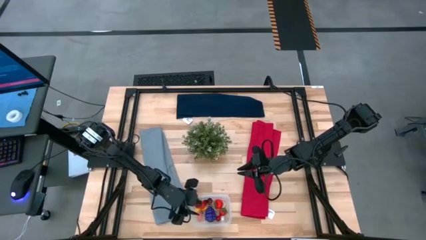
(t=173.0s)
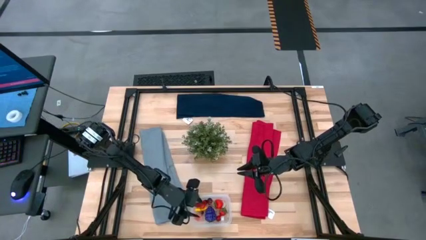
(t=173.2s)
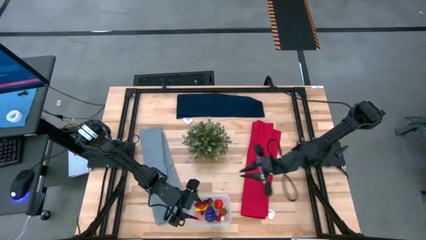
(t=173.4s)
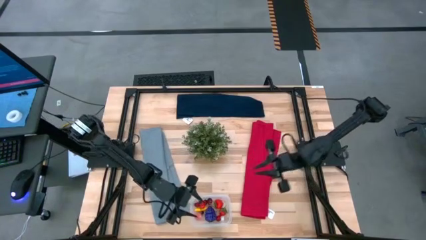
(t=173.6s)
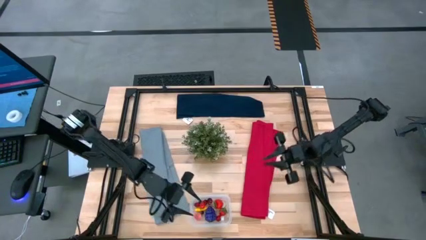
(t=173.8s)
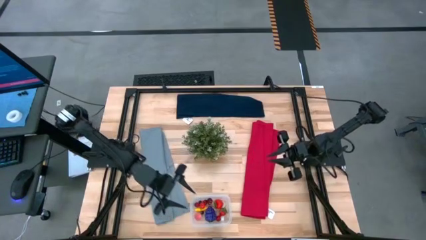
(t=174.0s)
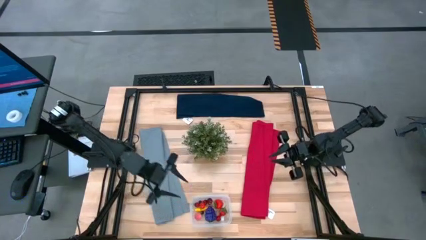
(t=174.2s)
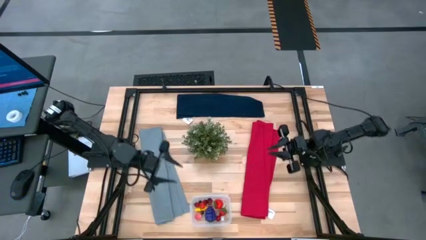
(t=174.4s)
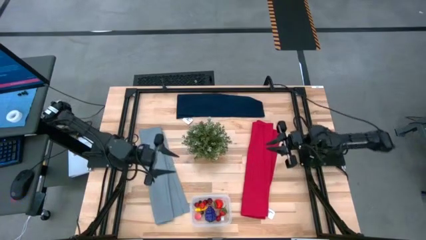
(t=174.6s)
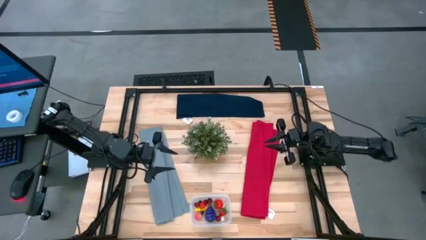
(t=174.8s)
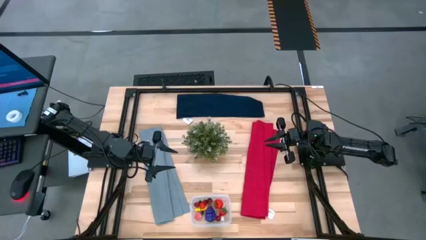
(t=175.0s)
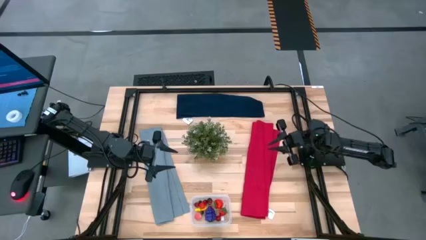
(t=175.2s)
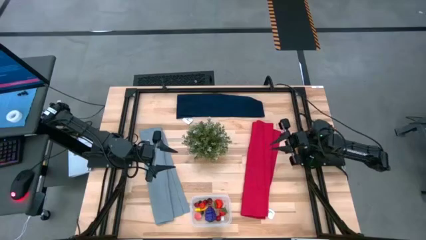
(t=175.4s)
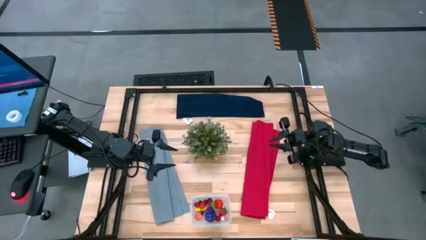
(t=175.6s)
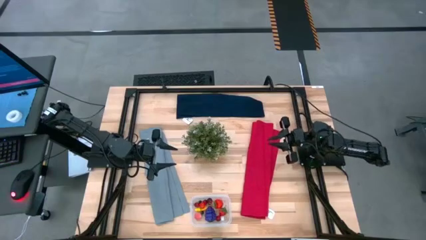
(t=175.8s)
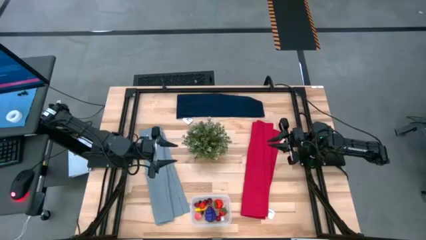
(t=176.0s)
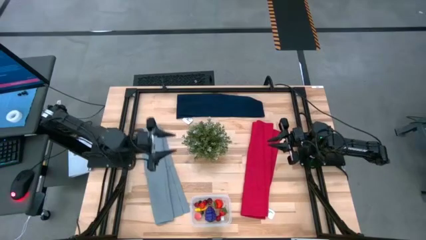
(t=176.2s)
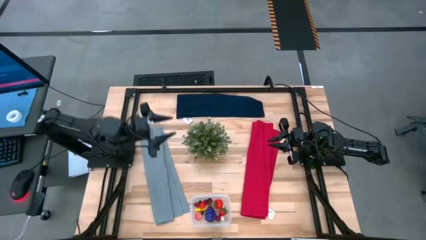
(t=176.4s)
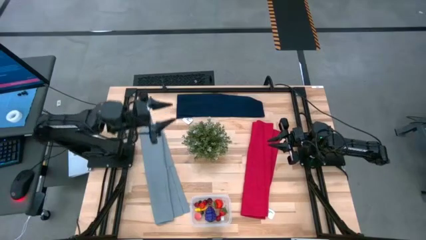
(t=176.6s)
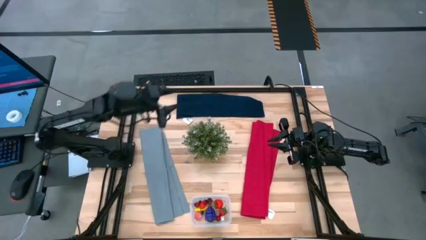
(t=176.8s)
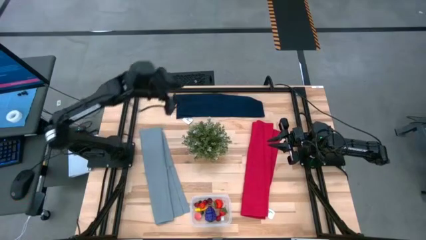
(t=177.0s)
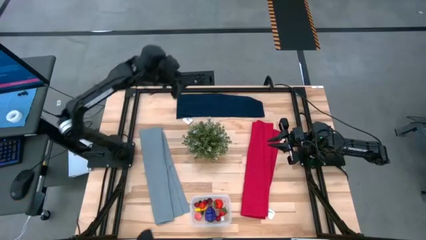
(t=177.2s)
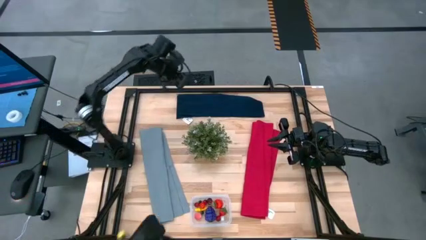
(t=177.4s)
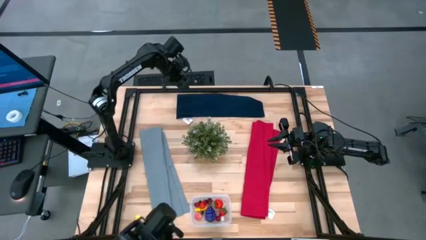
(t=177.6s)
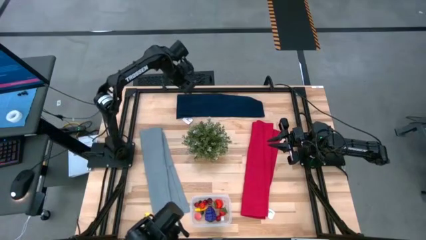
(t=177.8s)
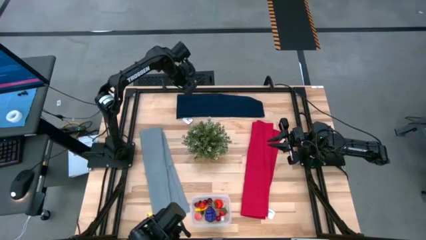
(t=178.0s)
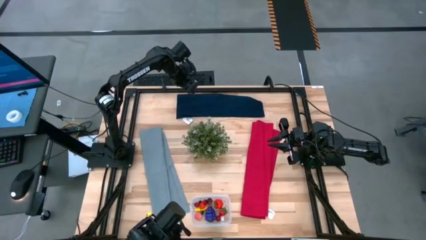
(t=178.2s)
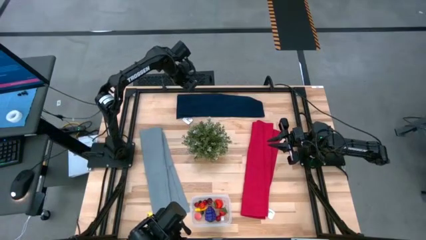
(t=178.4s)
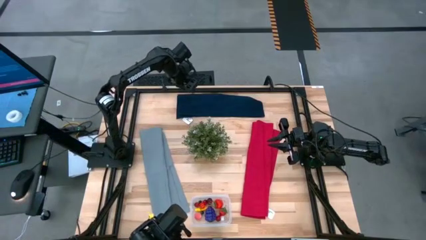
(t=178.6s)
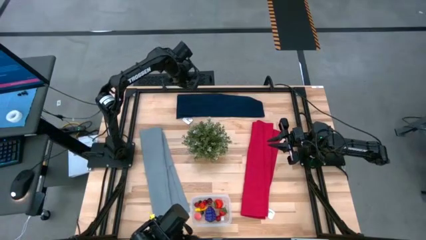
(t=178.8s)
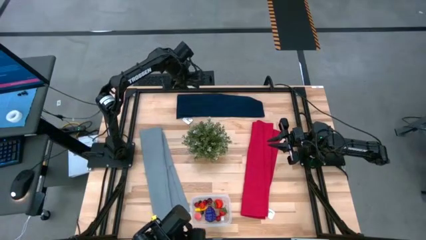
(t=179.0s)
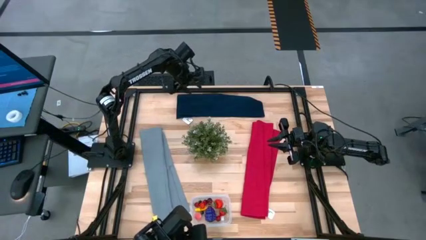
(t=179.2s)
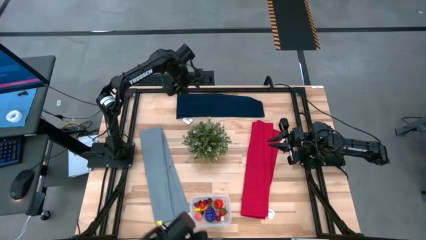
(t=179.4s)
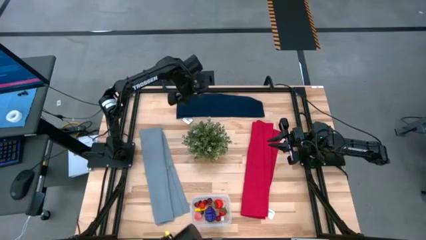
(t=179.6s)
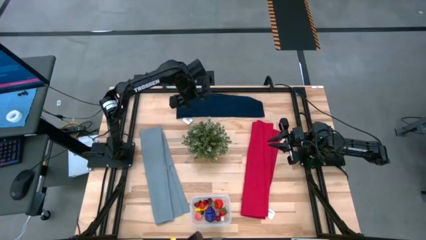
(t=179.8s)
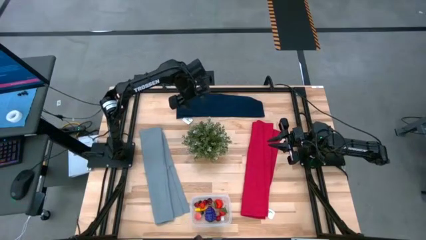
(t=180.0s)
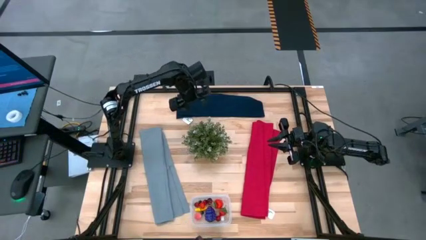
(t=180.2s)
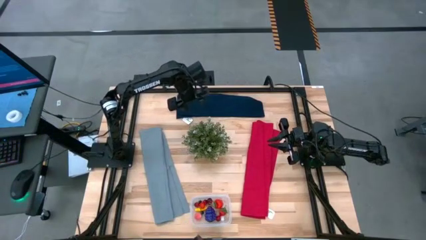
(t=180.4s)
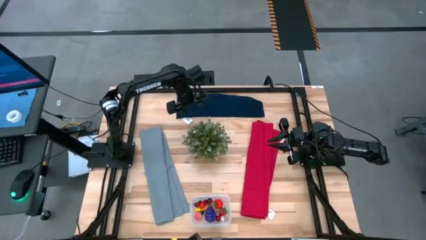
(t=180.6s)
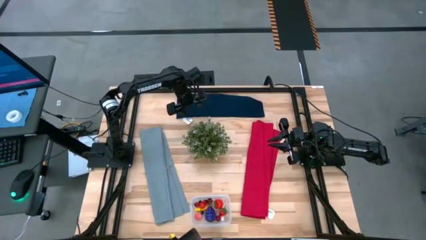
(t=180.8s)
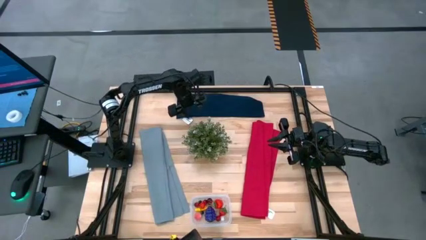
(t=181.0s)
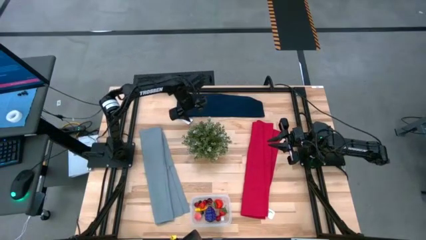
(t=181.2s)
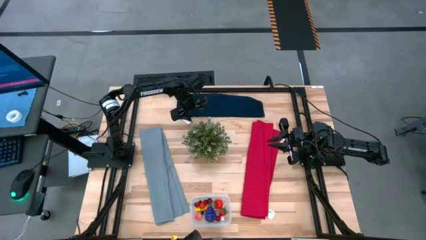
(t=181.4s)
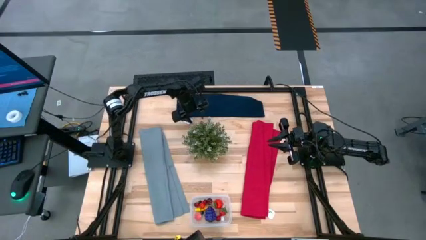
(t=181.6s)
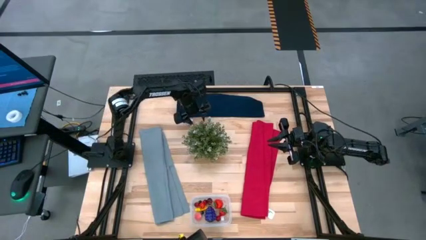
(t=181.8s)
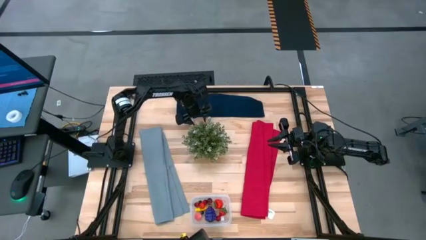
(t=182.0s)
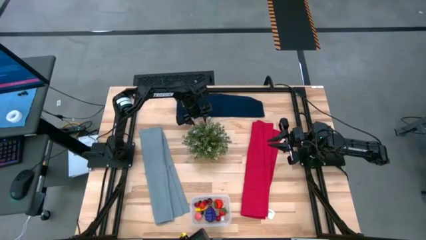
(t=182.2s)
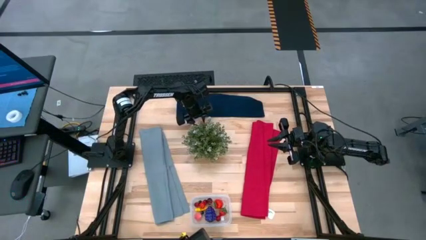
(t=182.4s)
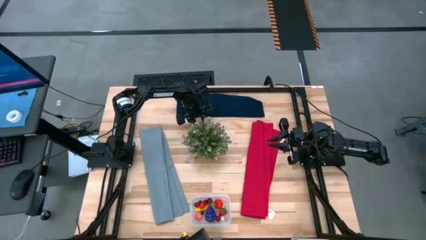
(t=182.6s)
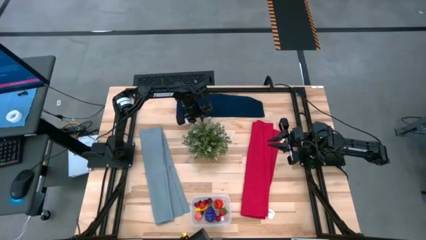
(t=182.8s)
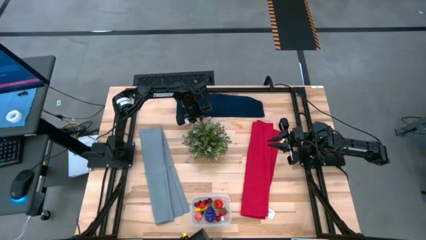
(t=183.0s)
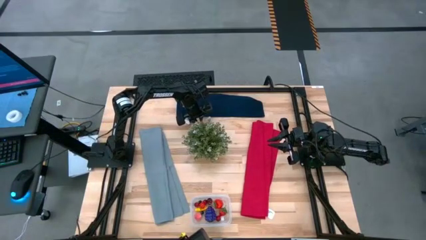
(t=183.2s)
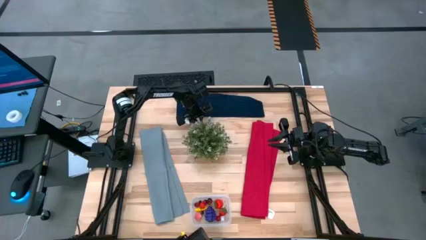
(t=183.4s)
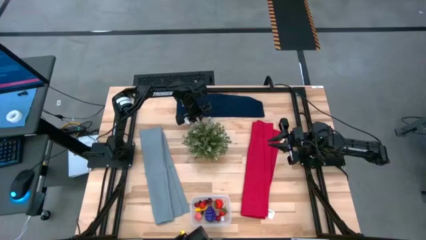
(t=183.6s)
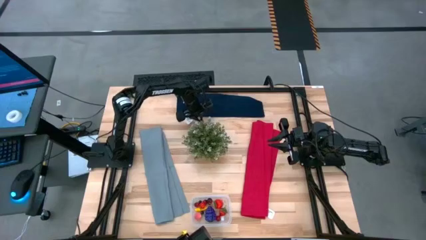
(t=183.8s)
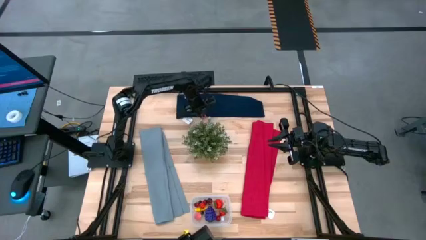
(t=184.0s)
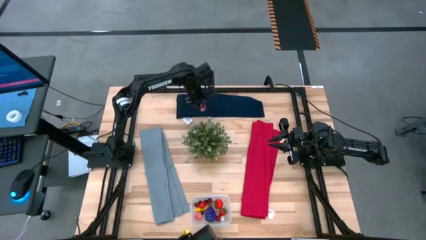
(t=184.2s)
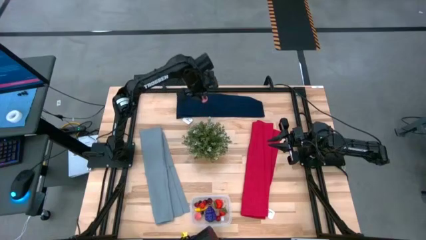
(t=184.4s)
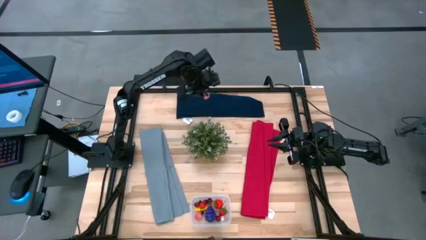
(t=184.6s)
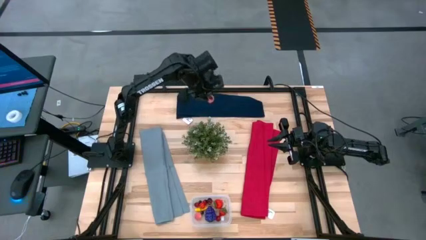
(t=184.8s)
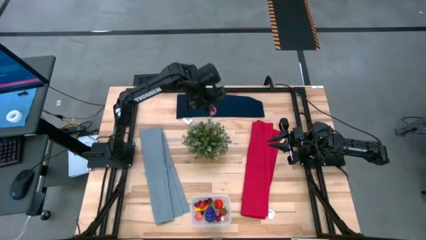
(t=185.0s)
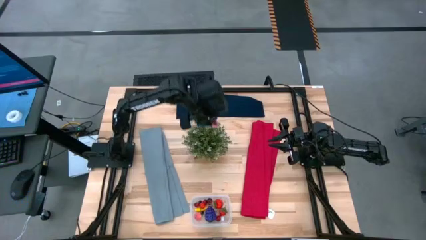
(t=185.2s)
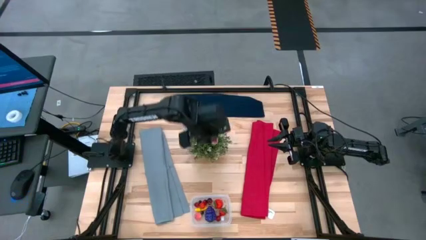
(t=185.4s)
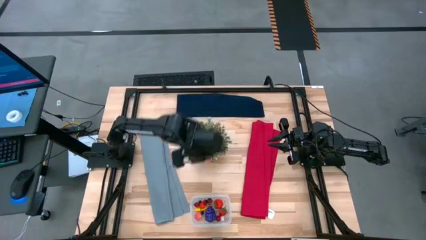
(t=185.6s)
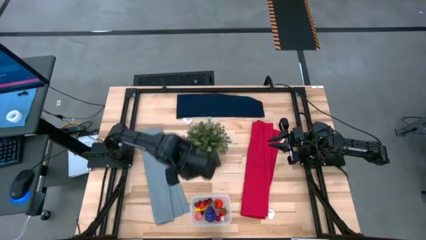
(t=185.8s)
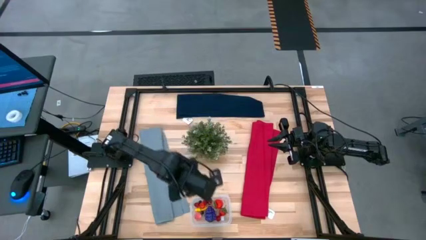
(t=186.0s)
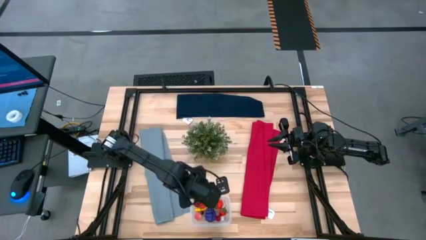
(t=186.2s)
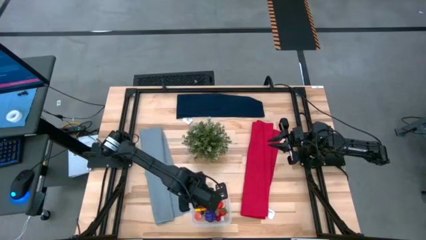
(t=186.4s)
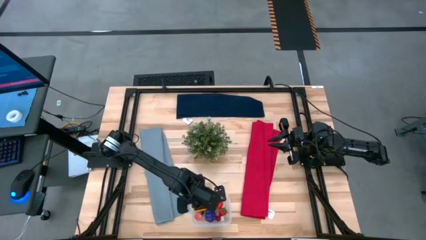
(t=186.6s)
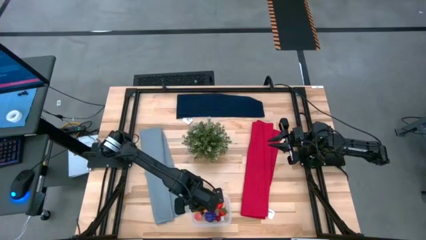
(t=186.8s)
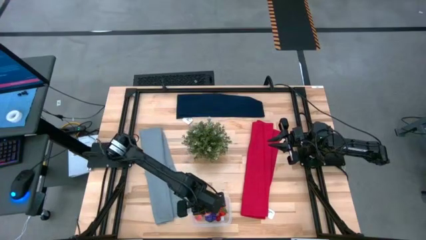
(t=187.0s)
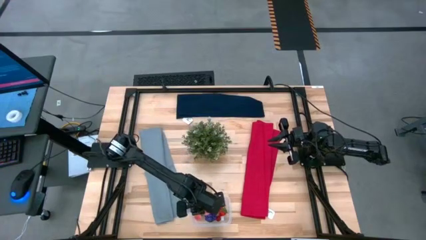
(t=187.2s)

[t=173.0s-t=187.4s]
Task: Pick and placing Produce into tupperware
Put the apricot into the transparent container
